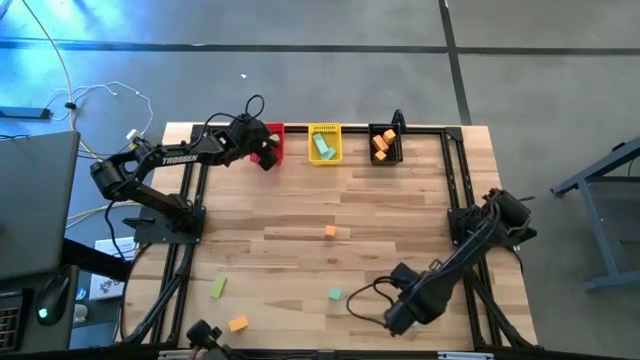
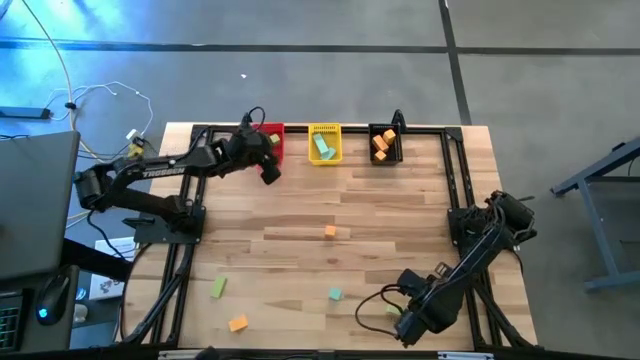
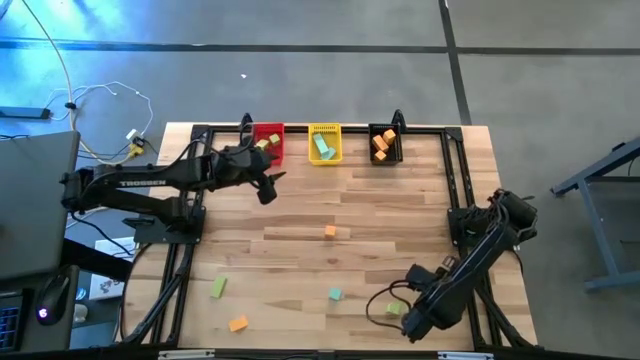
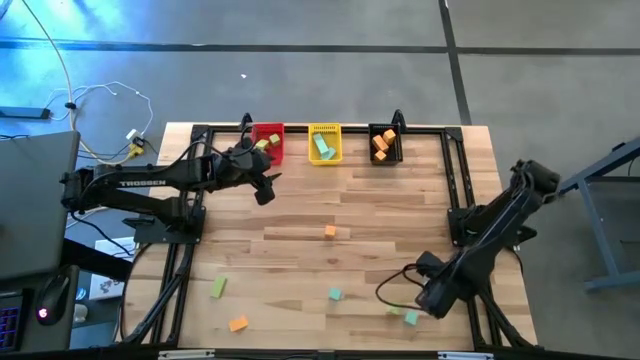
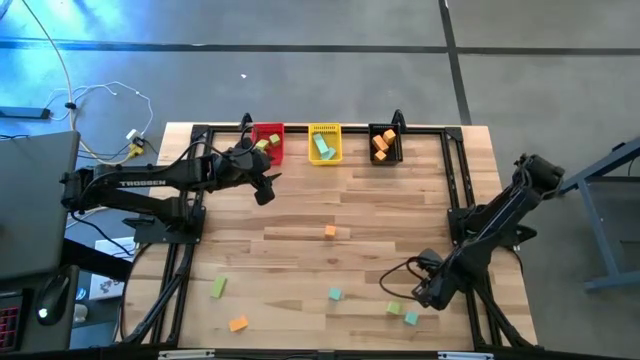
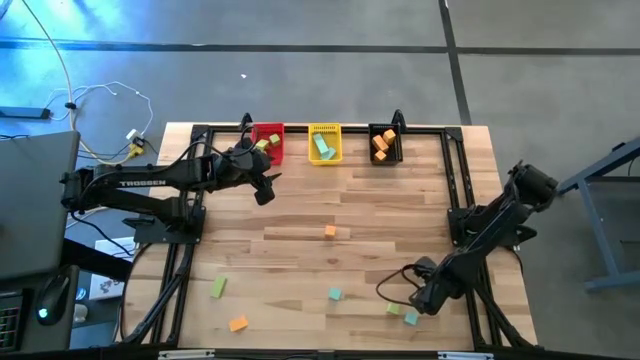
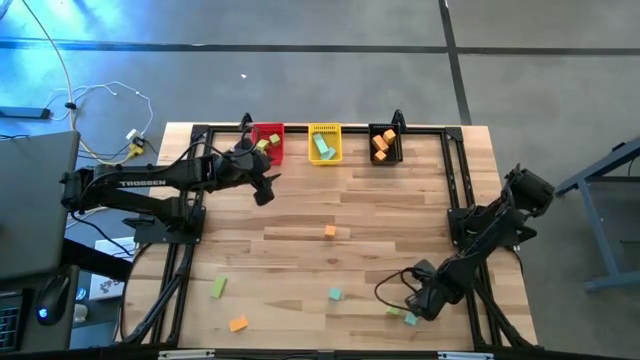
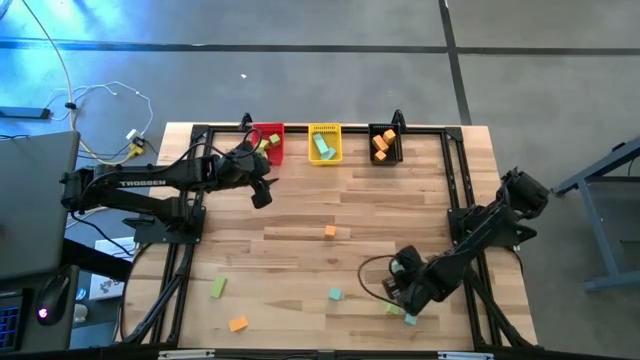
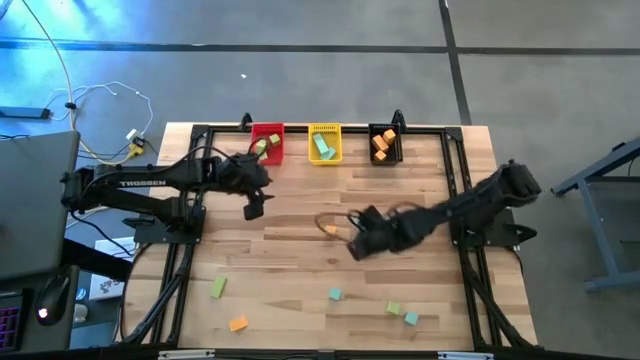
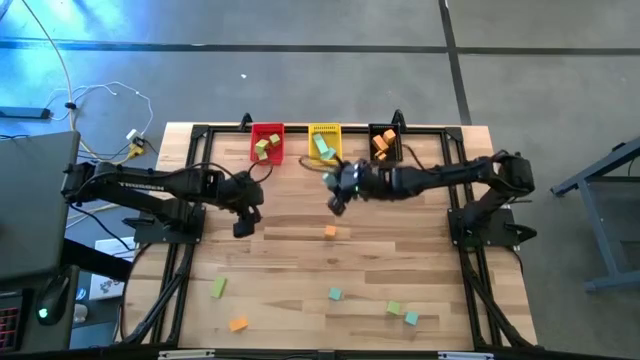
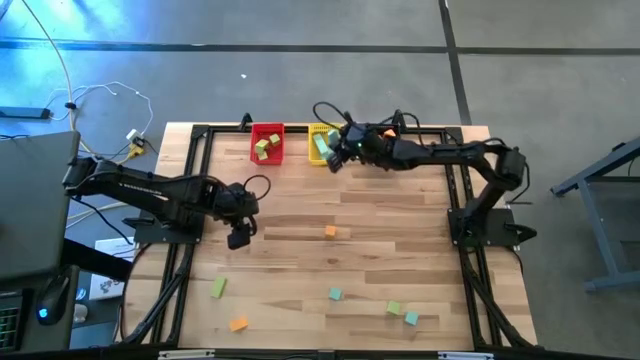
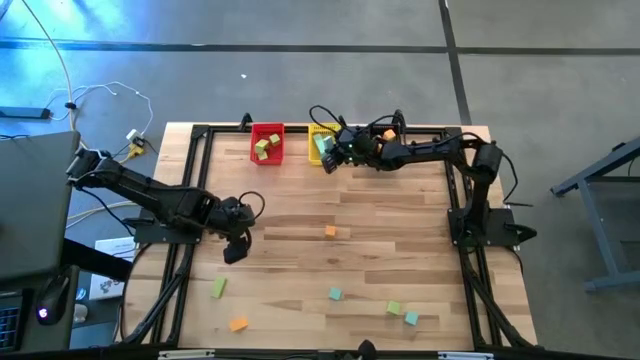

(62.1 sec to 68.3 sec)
Task: Sort & place blocks by color
Put the blue block into the yellow basket

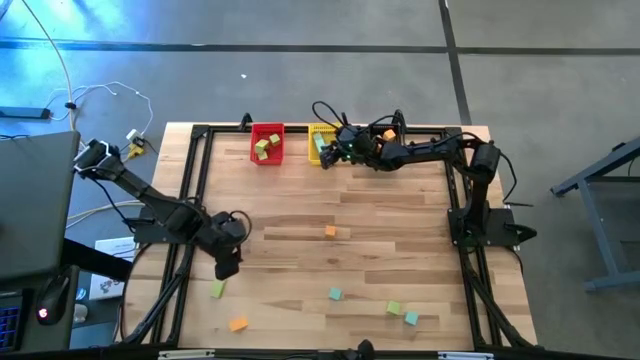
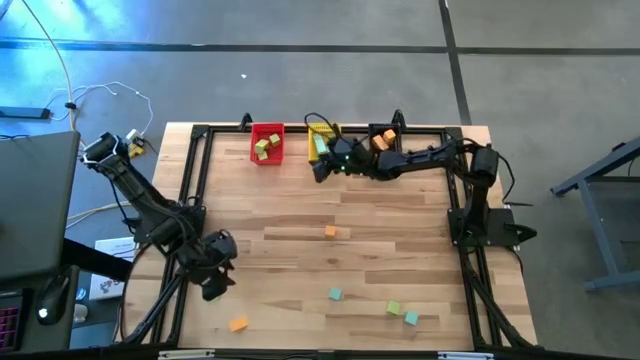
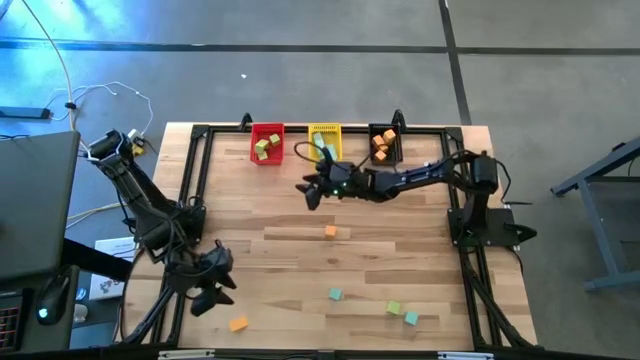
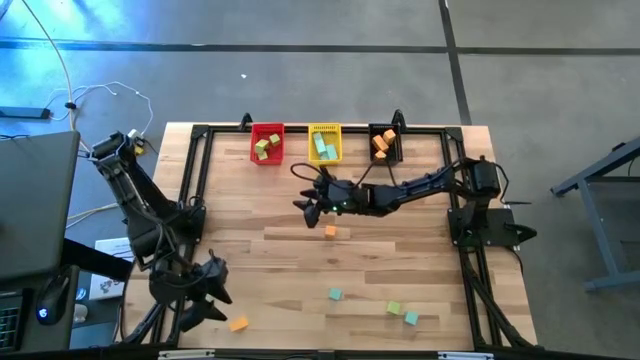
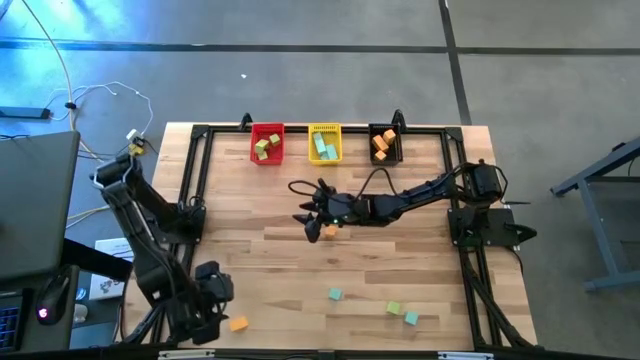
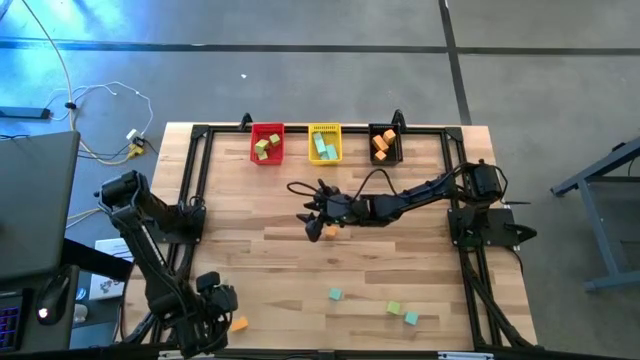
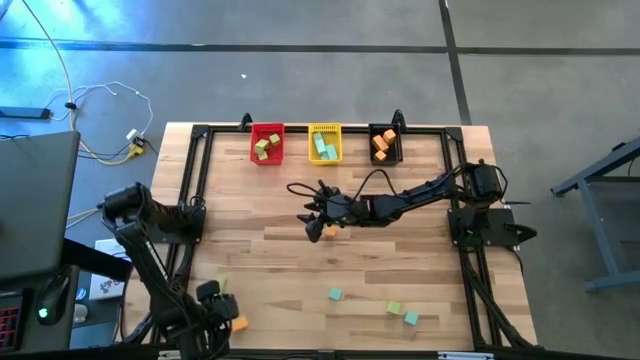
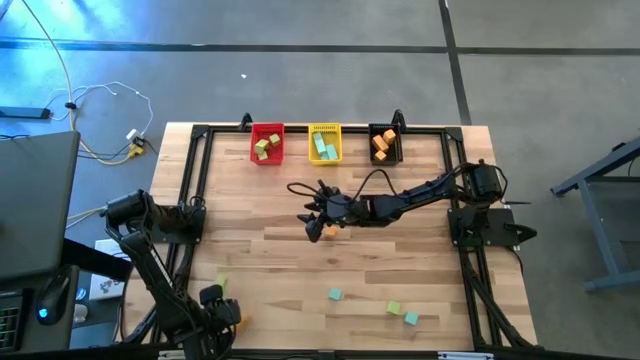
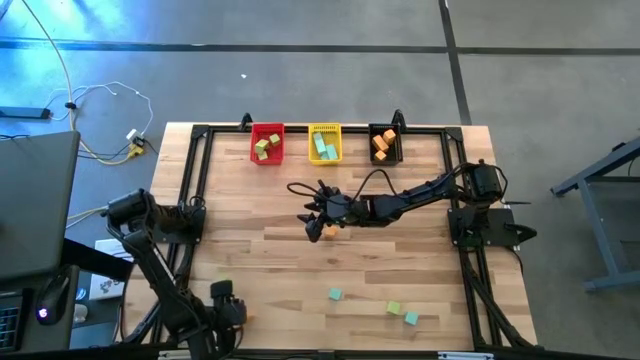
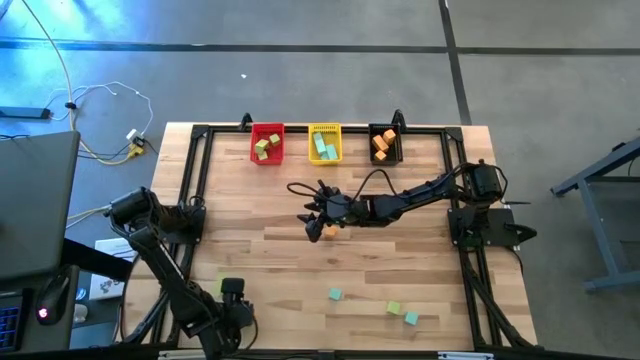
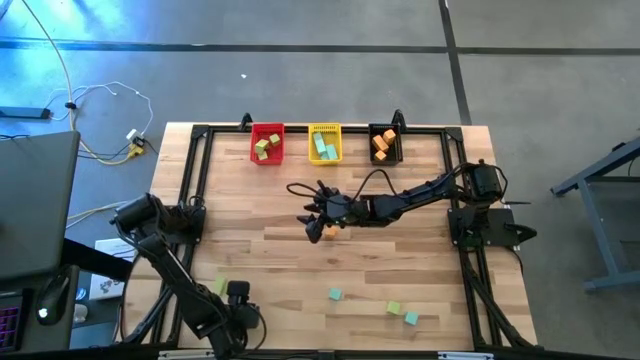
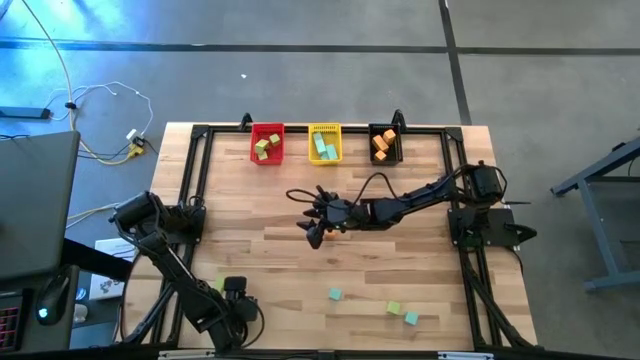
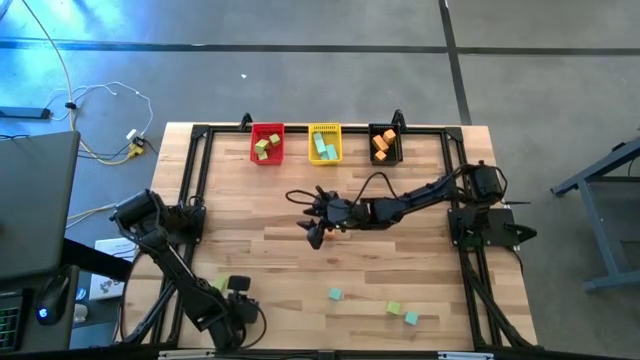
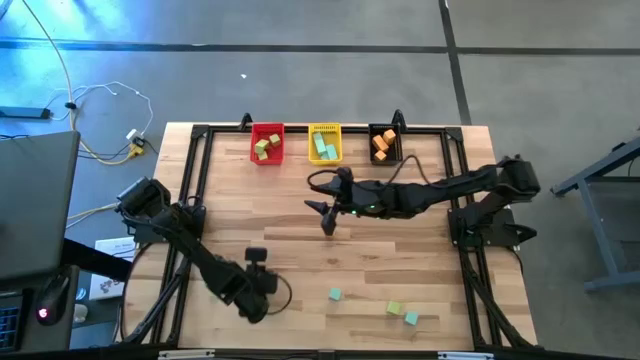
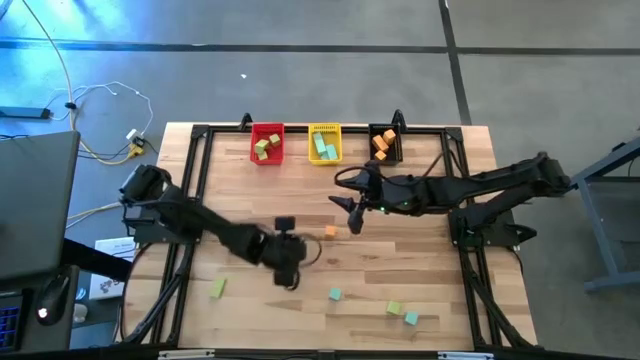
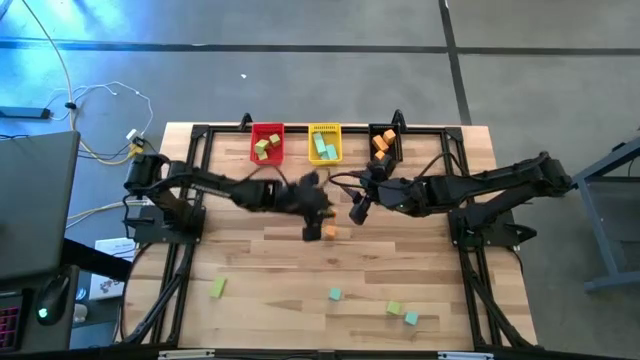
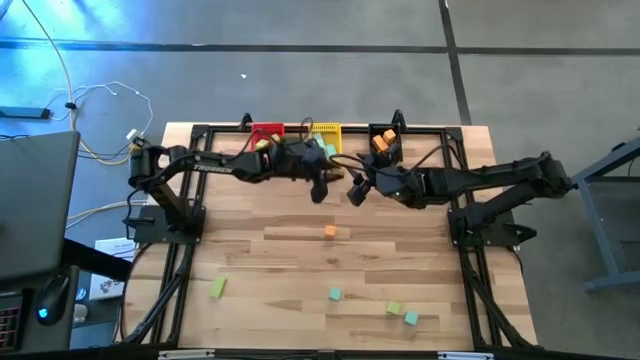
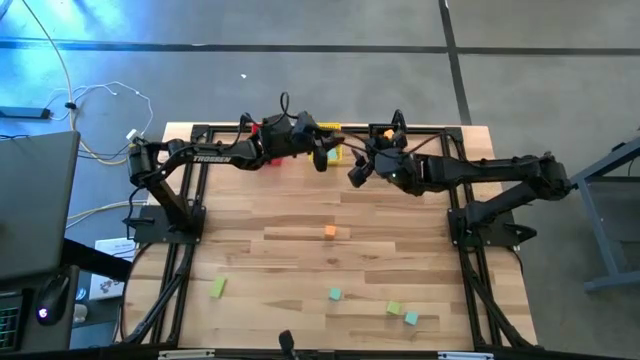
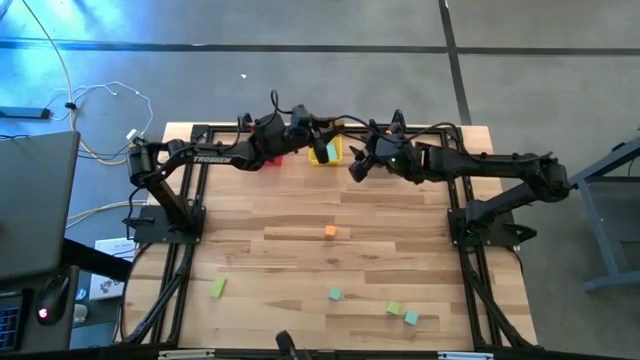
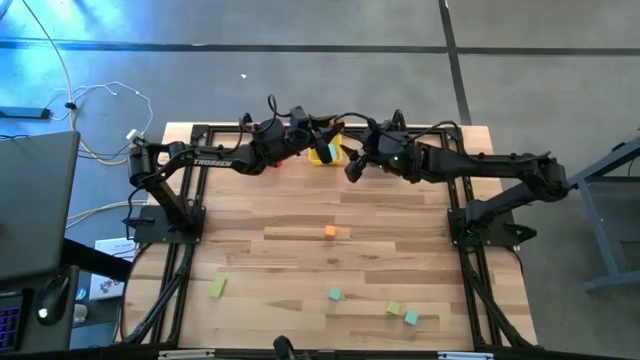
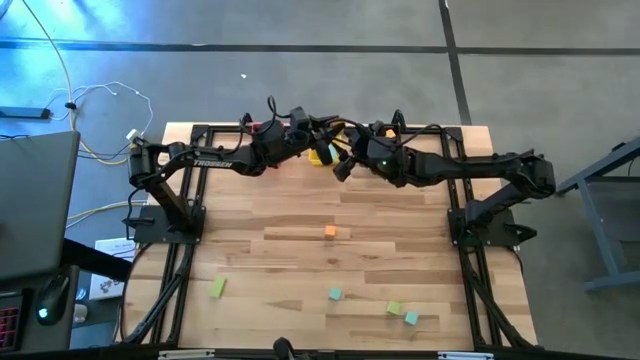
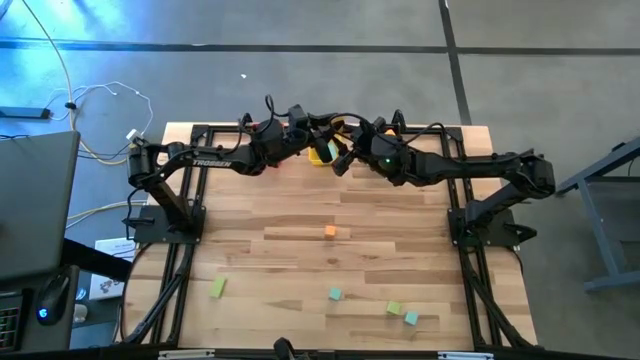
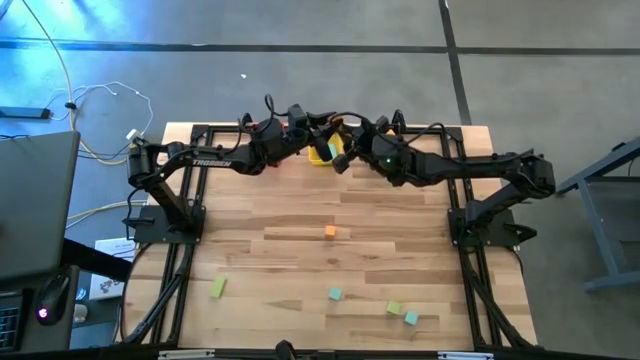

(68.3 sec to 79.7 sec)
Put the orange block into the black basket

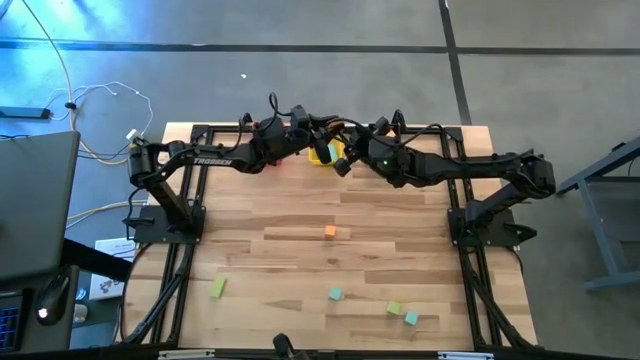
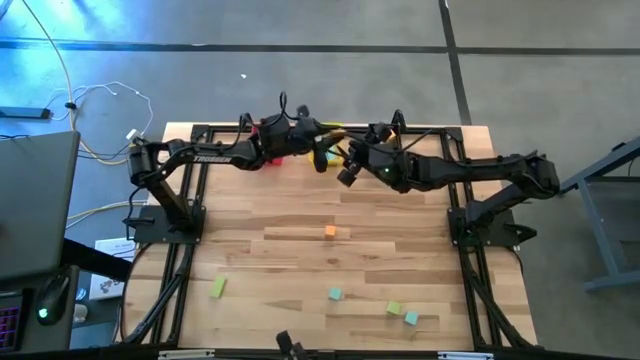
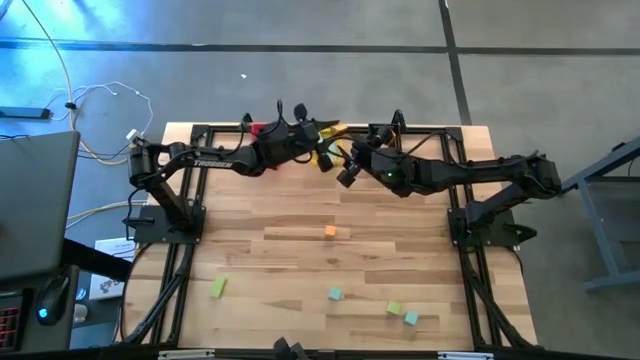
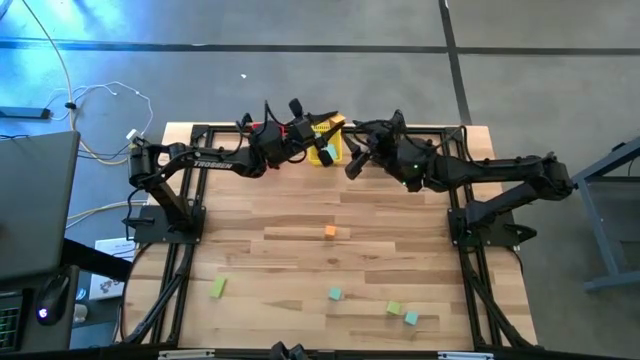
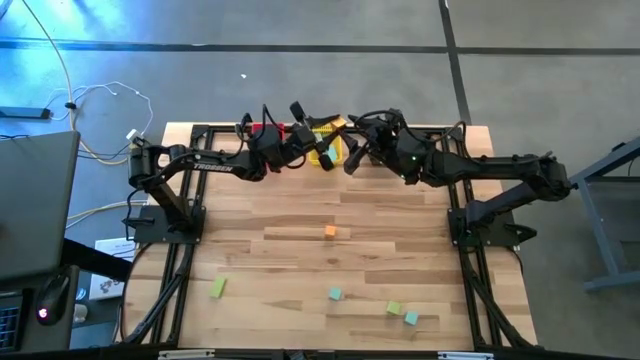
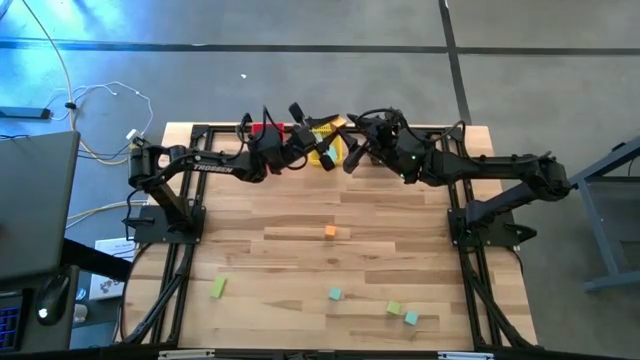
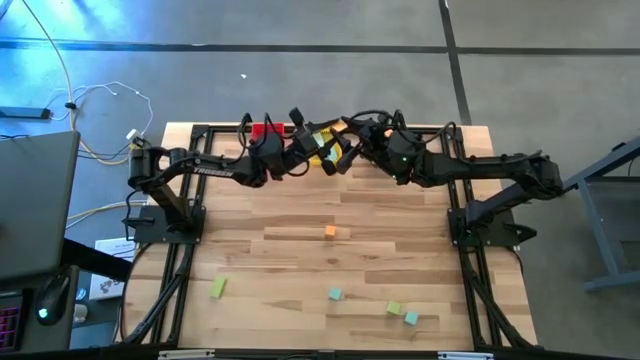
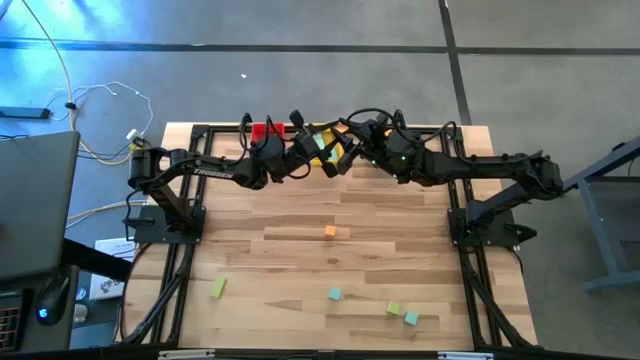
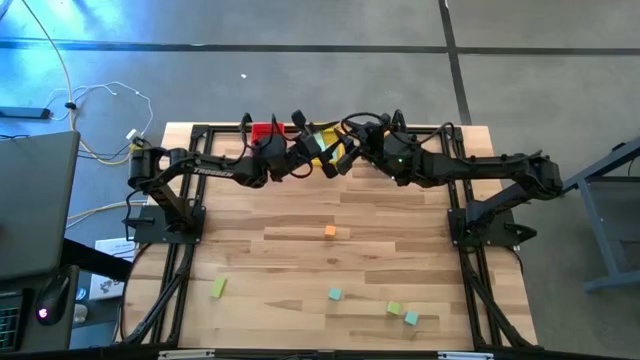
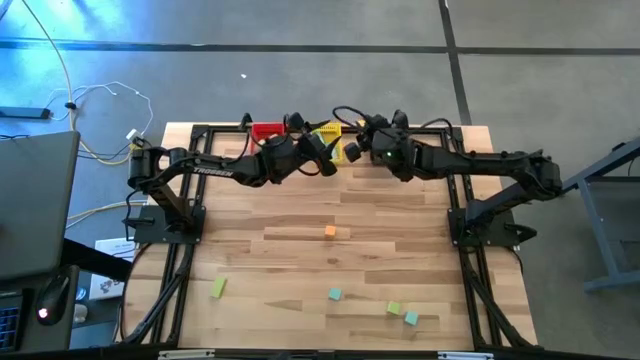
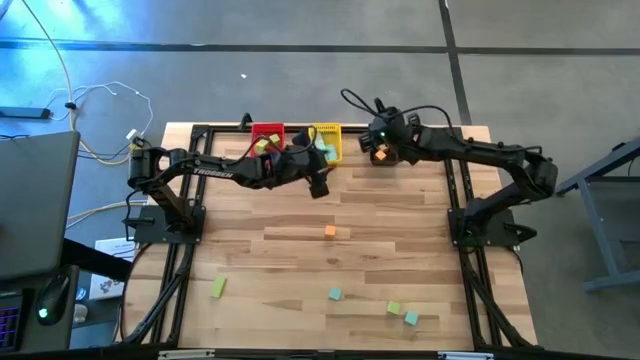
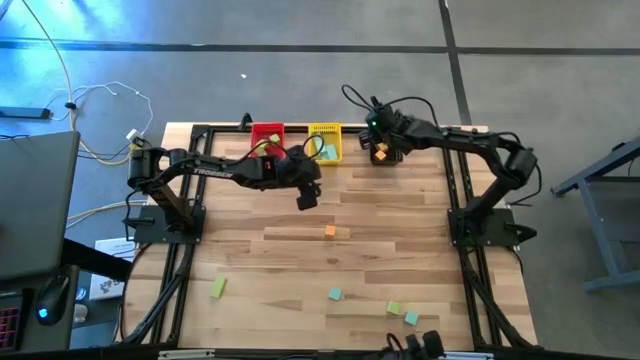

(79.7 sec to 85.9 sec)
Put the orange block into the black basket
